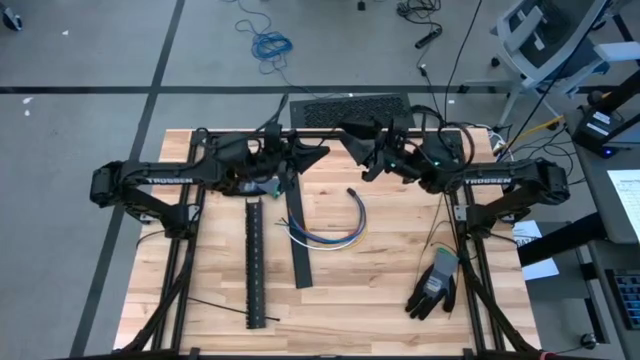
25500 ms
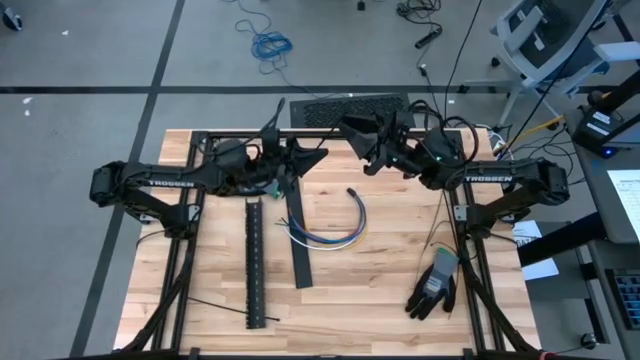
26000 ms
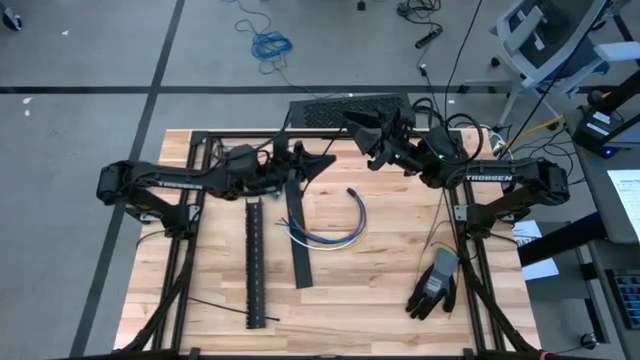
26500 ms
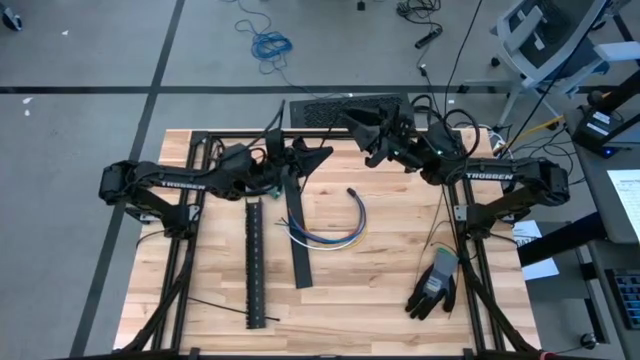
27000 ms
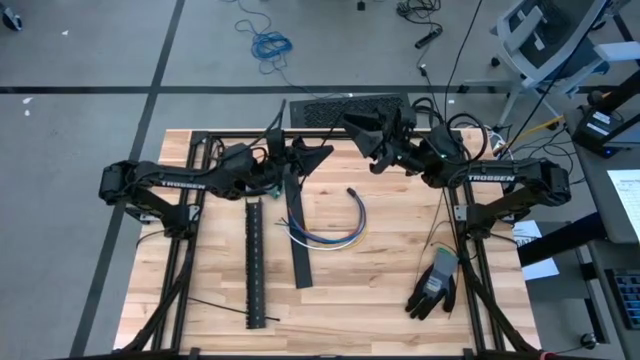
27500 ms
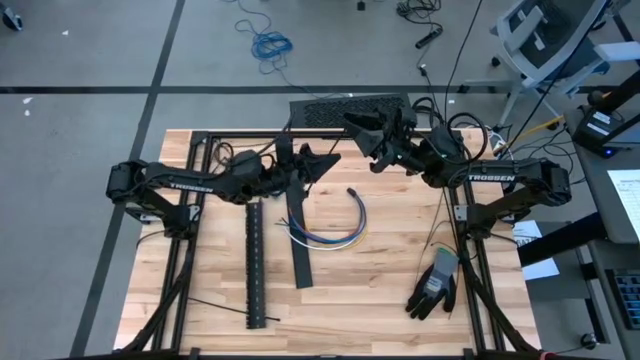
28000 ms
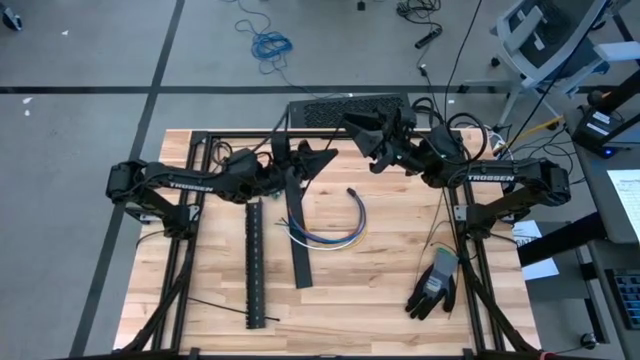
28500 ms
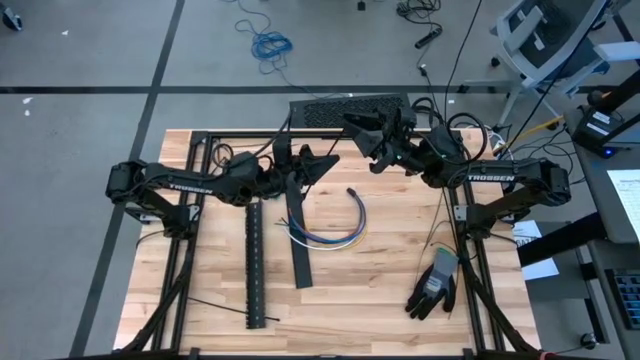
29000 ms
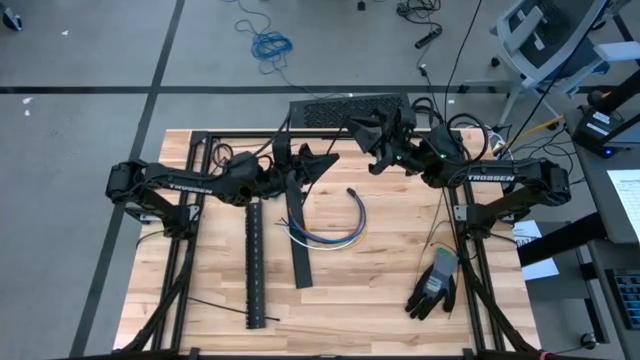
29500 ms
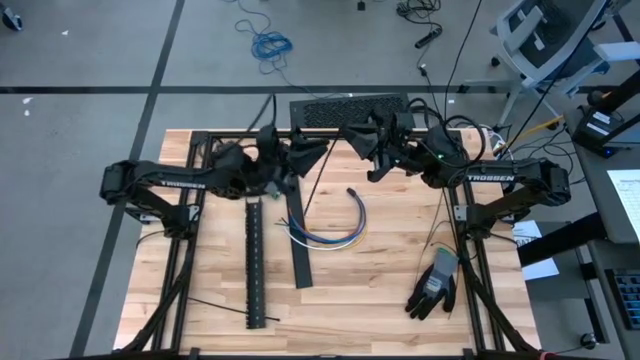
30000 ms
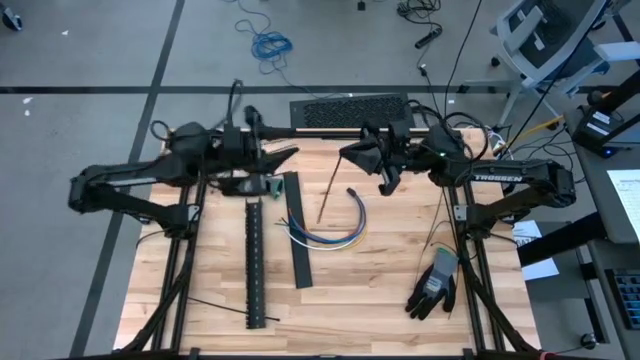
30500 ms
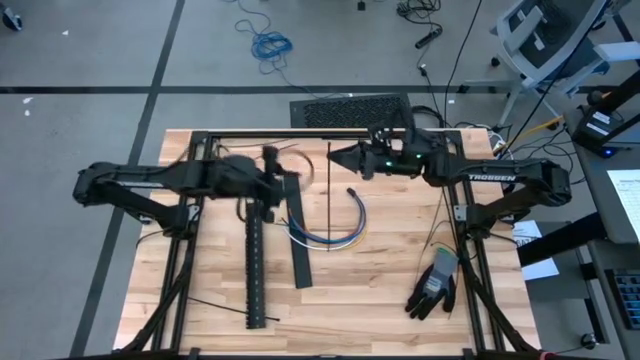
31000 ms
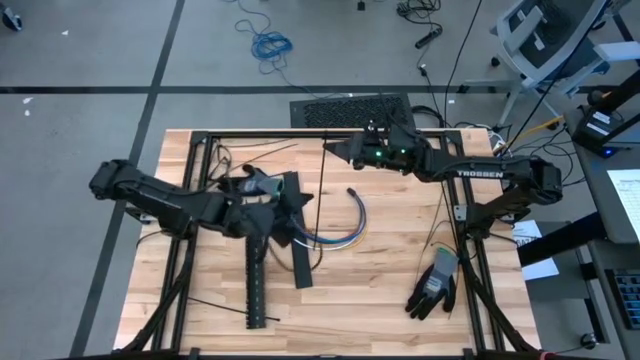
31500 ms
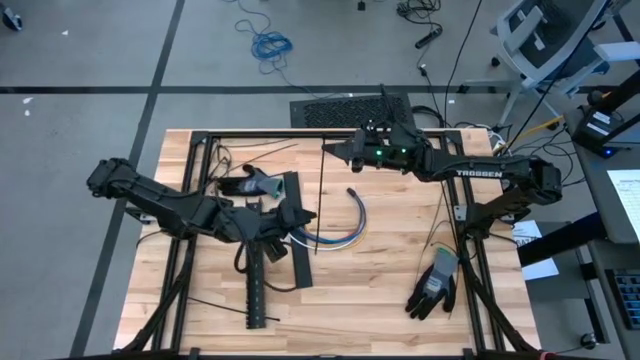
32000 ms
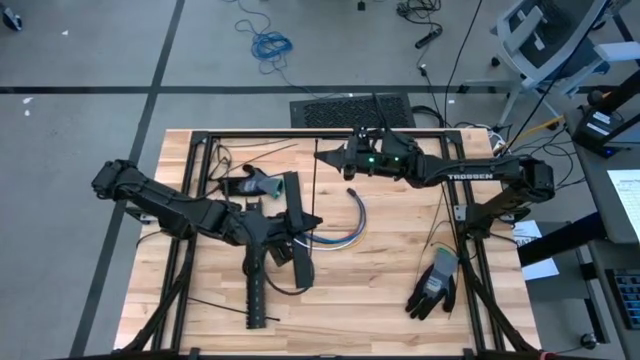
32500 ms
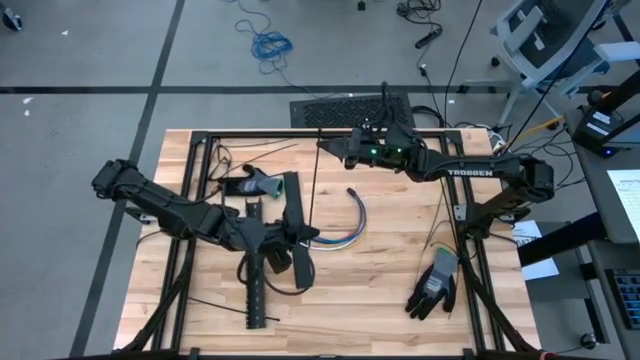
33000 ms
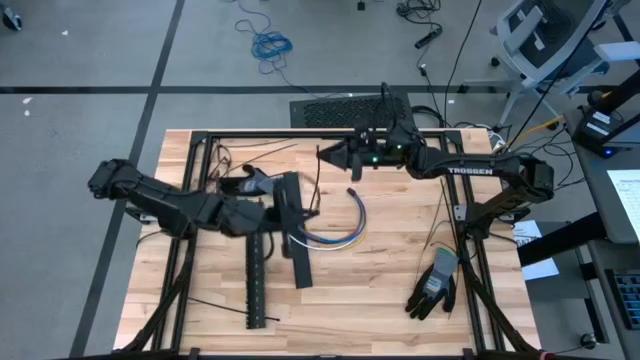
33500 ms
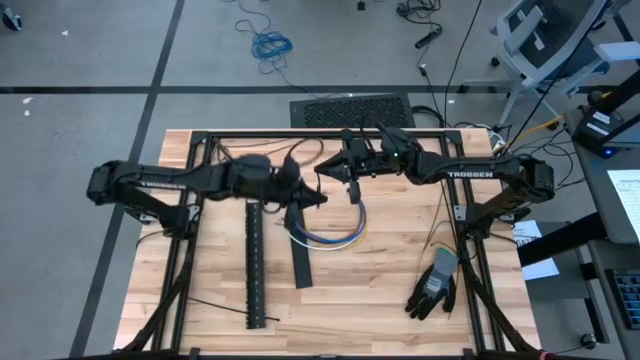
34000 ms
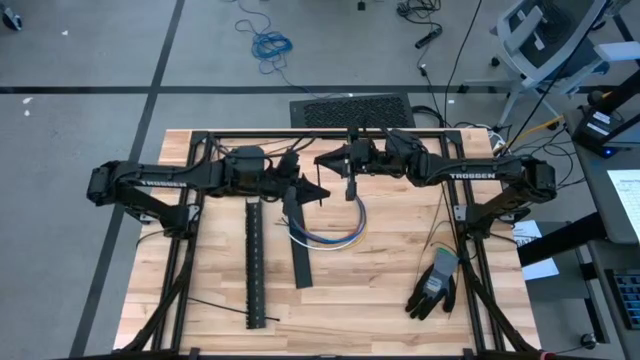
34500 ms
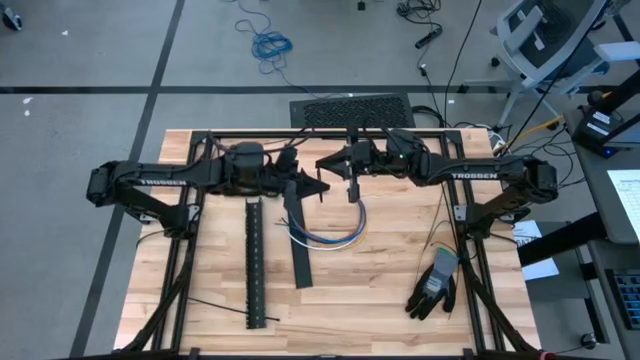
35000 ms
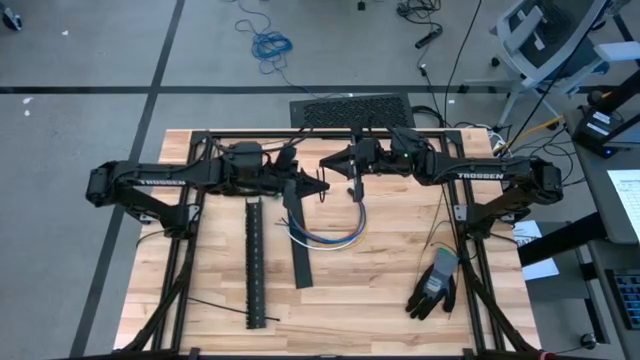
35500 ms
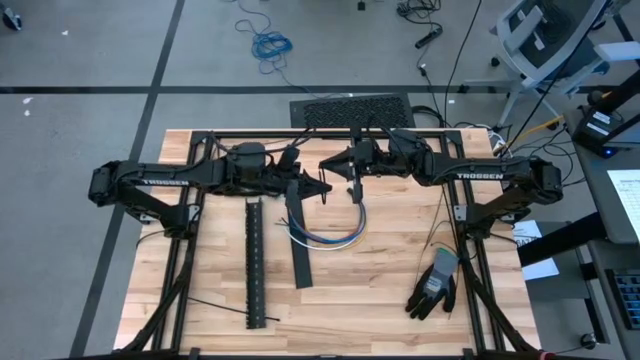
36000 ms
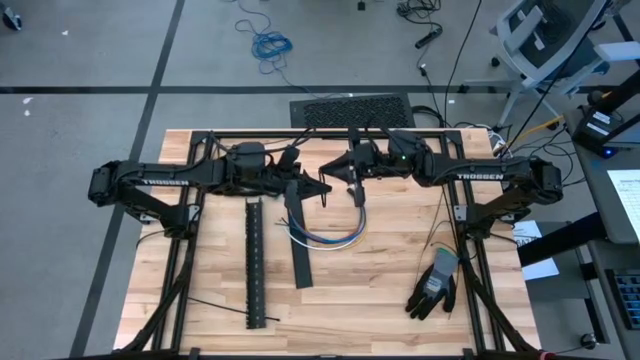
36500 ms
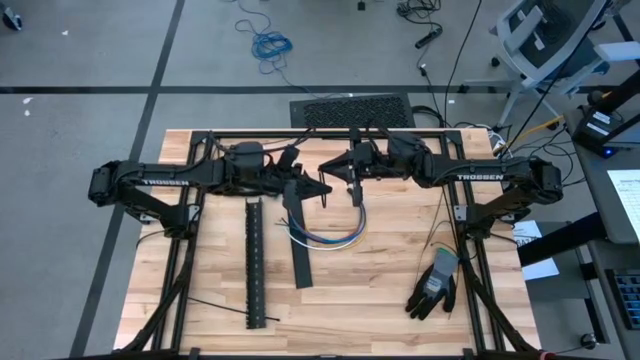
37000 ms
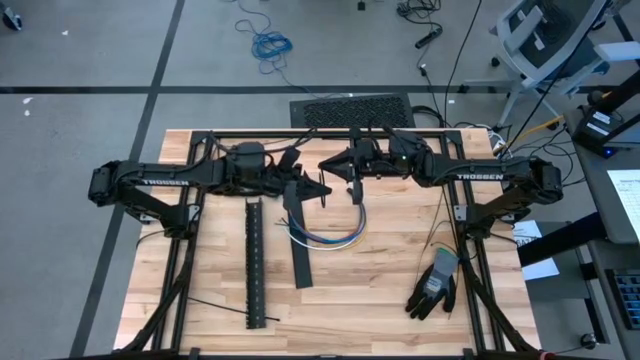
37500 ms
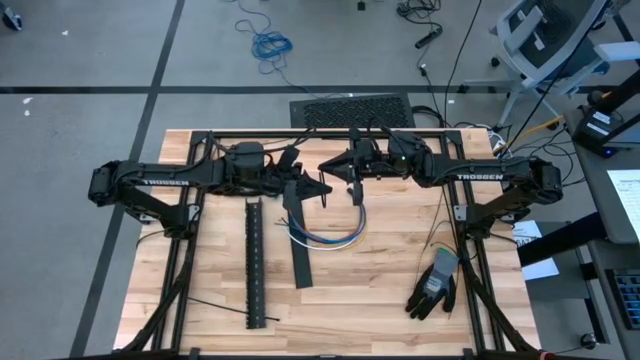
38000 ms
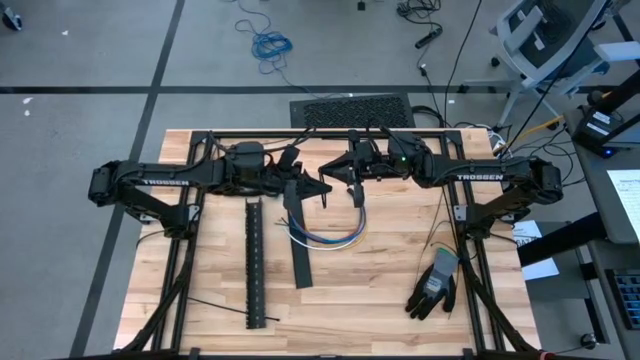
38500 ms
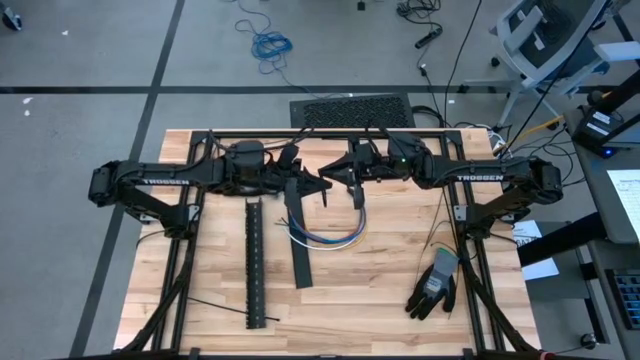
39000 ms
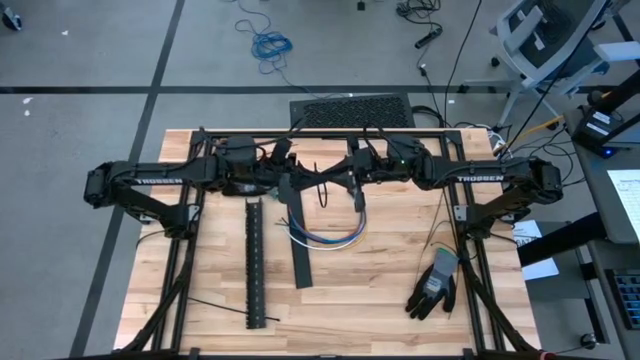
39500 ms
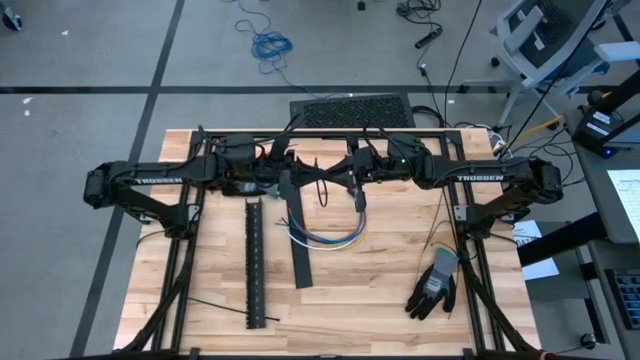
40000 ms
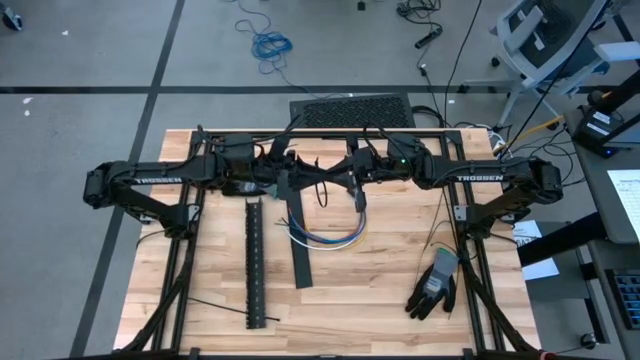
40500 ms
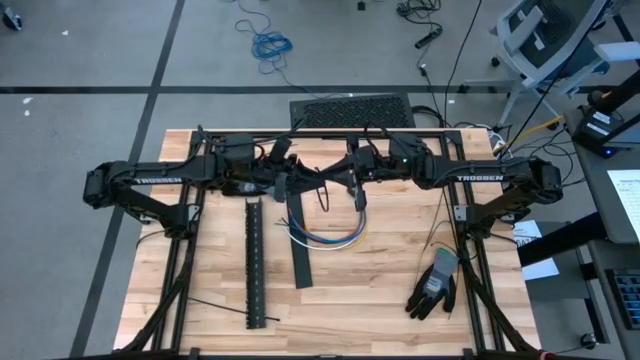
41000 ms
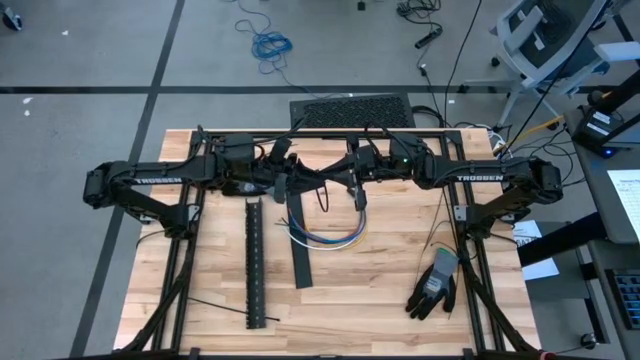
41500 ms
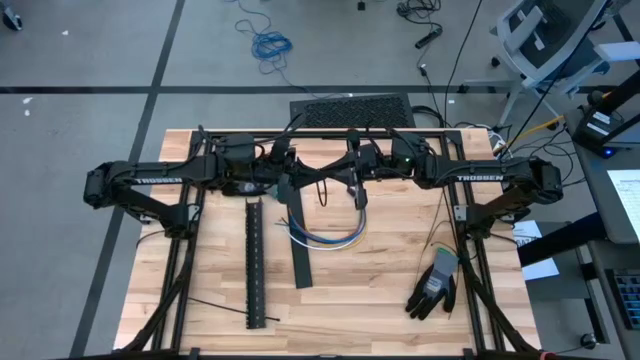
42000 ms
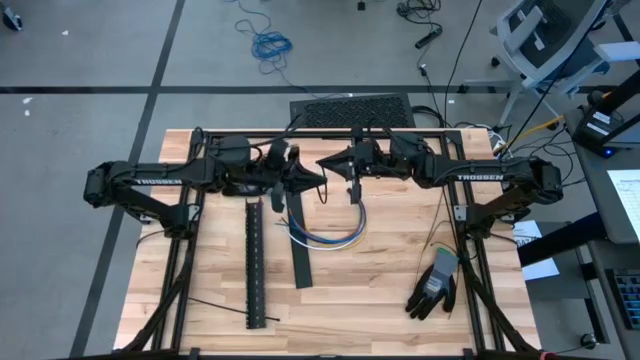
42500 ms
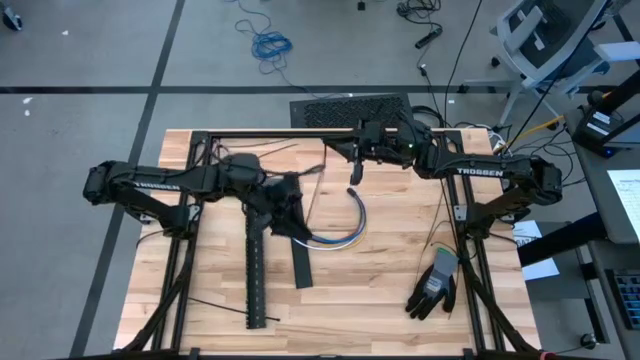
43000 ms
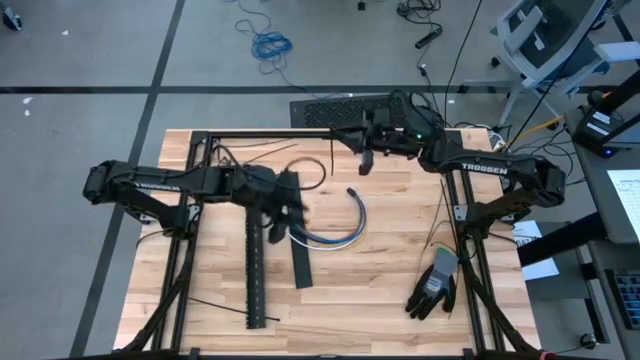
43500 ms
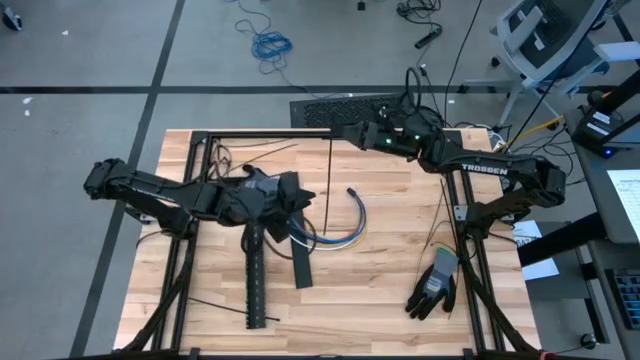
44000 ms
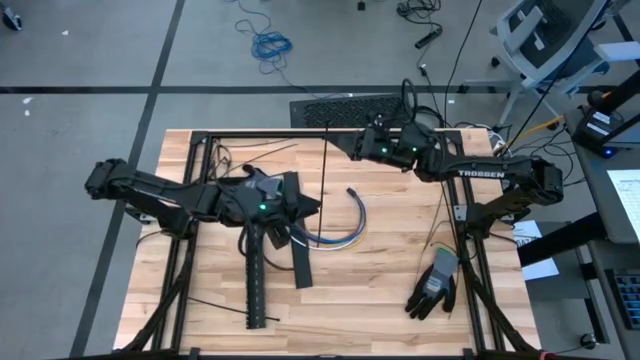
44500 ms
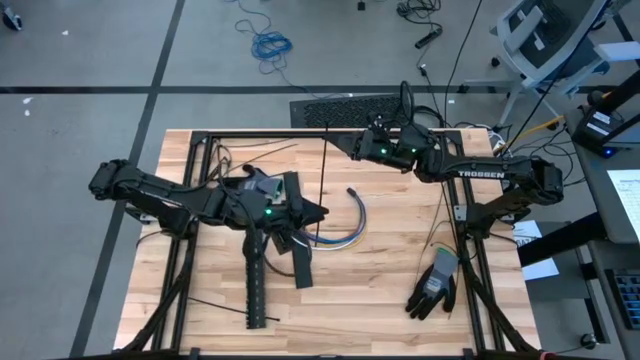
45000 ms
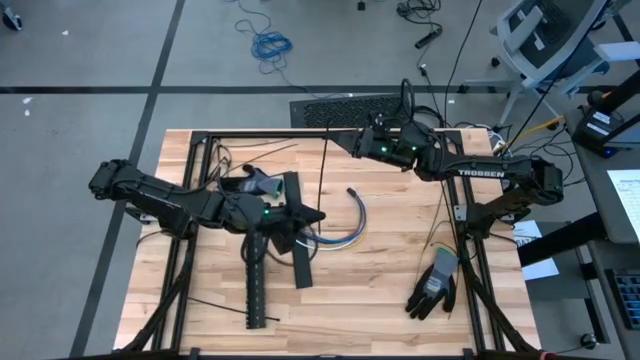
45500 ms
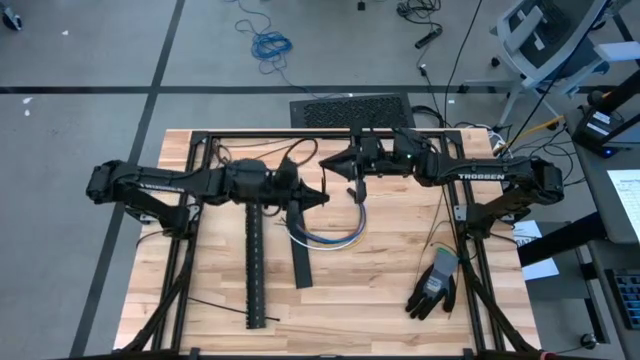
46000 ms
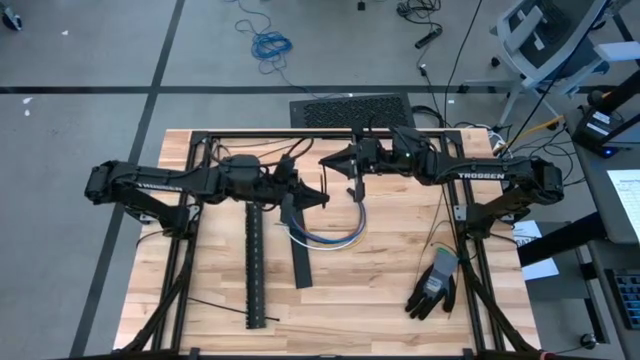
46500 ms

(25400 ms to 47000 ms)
Task: Ziptie cables
Wrap the cable wires with a black zip tie
